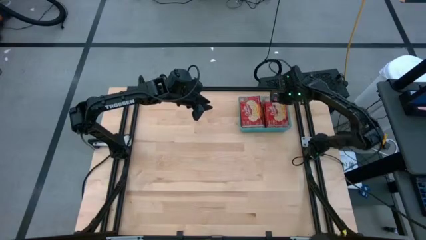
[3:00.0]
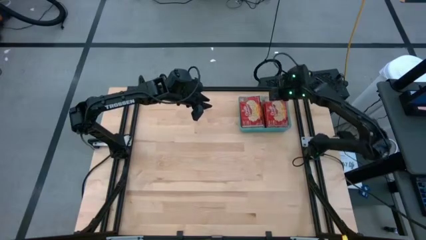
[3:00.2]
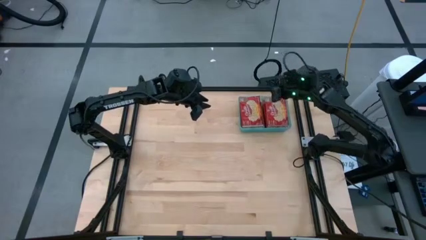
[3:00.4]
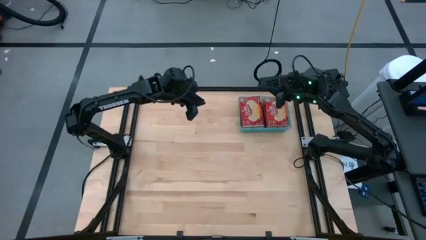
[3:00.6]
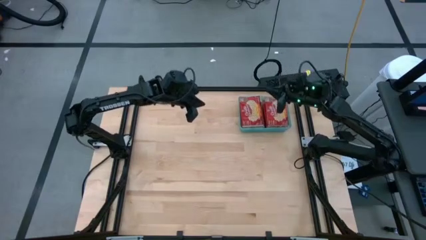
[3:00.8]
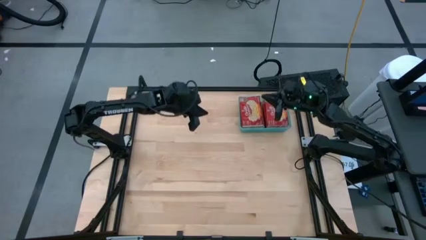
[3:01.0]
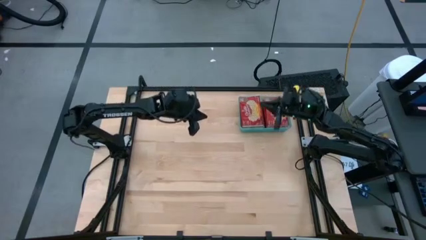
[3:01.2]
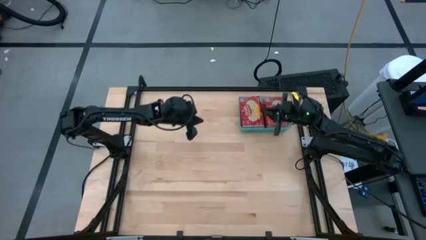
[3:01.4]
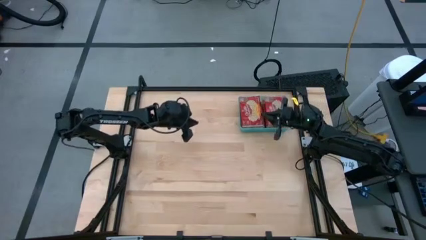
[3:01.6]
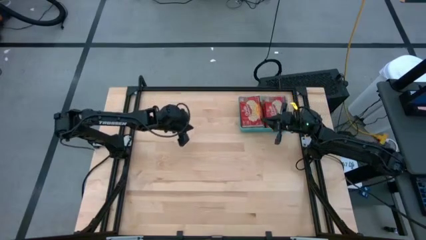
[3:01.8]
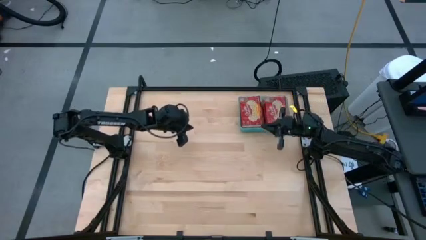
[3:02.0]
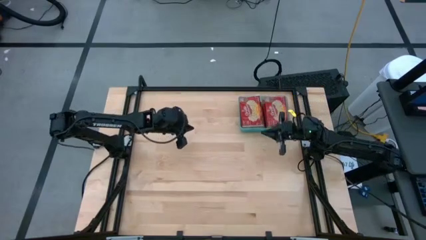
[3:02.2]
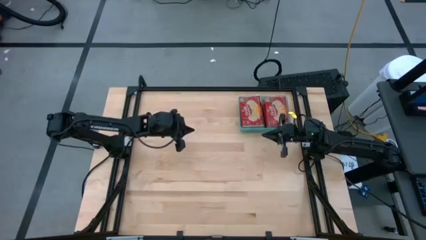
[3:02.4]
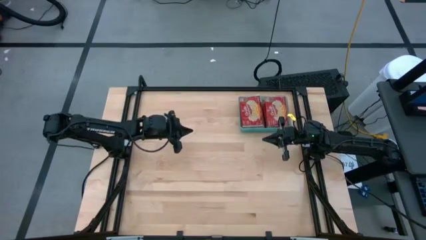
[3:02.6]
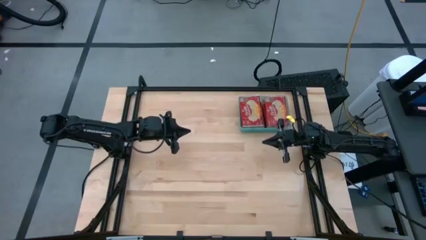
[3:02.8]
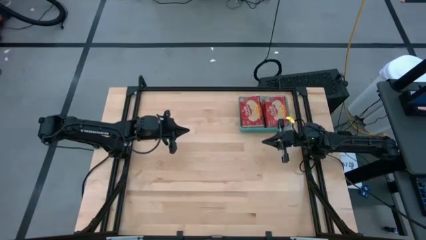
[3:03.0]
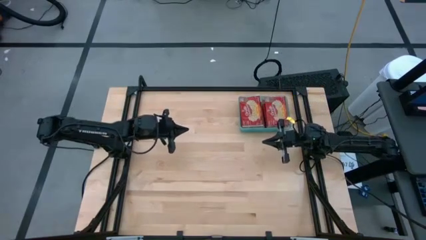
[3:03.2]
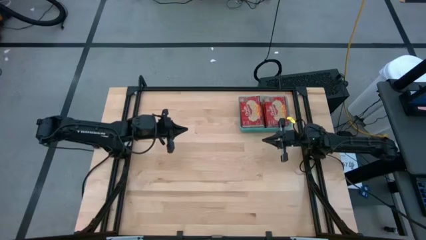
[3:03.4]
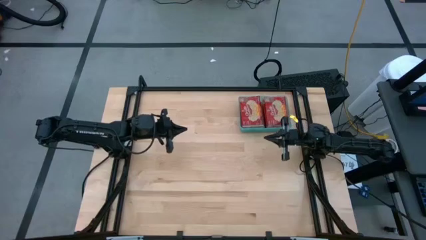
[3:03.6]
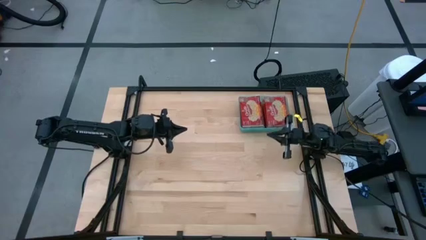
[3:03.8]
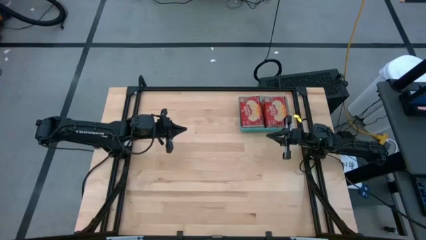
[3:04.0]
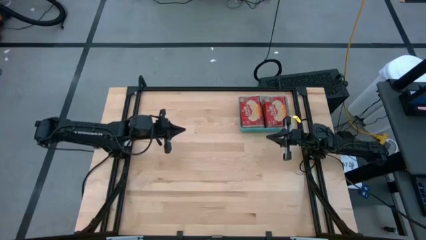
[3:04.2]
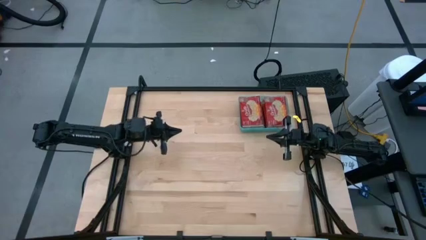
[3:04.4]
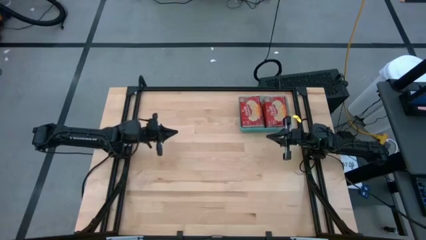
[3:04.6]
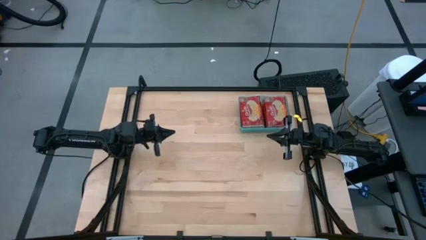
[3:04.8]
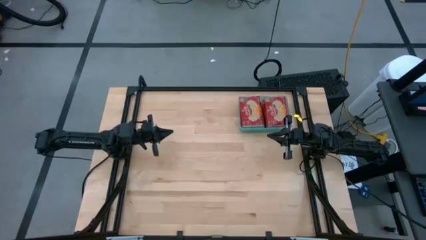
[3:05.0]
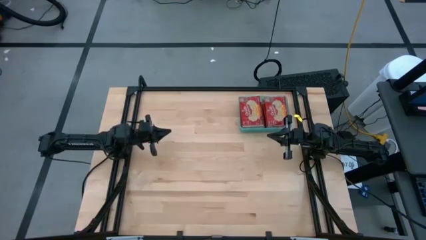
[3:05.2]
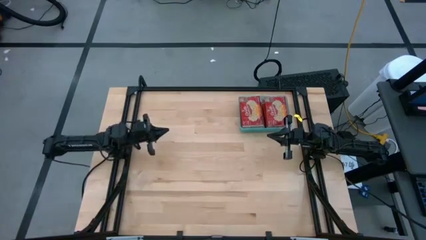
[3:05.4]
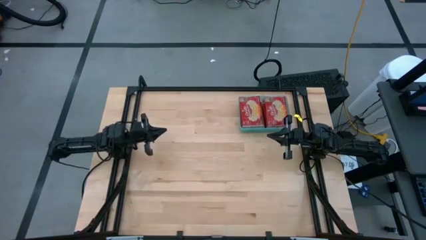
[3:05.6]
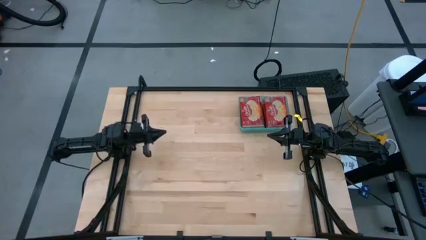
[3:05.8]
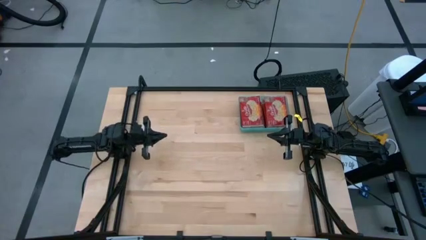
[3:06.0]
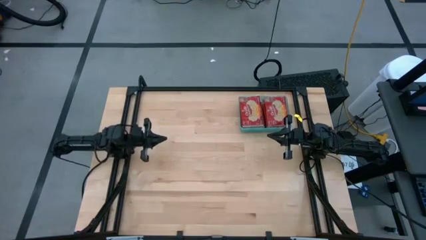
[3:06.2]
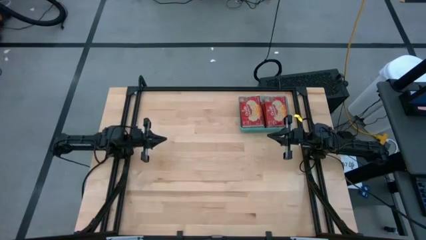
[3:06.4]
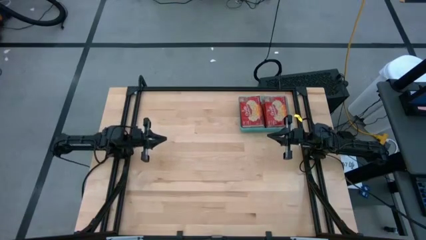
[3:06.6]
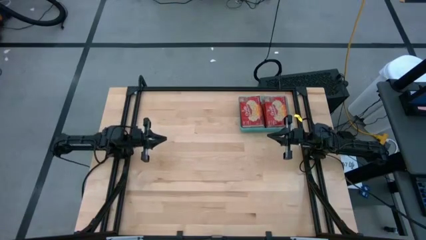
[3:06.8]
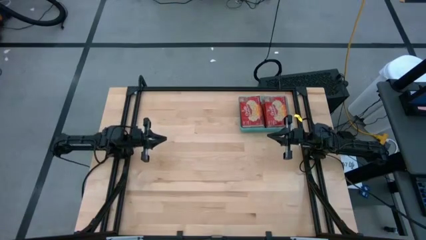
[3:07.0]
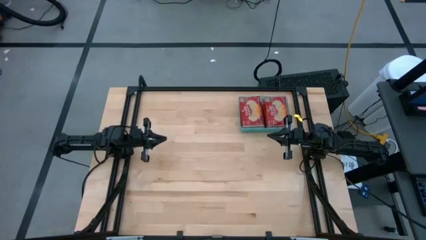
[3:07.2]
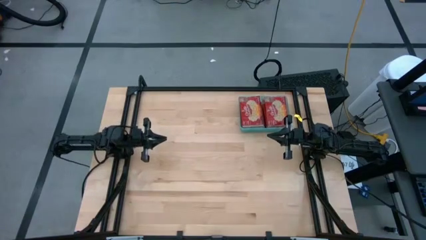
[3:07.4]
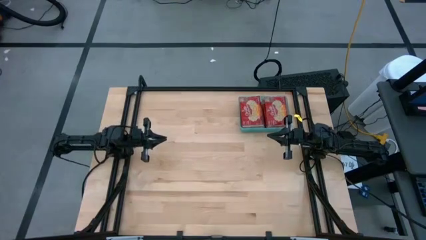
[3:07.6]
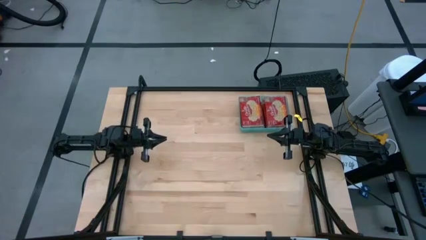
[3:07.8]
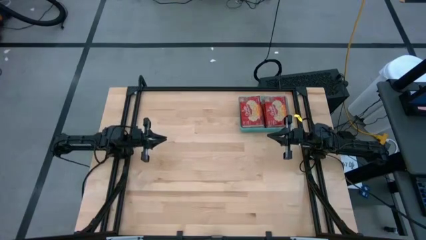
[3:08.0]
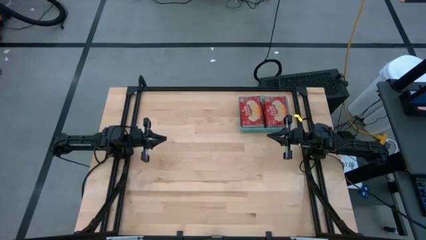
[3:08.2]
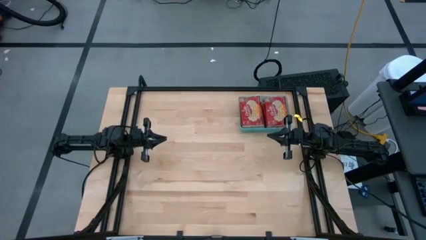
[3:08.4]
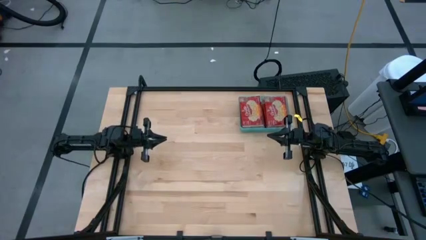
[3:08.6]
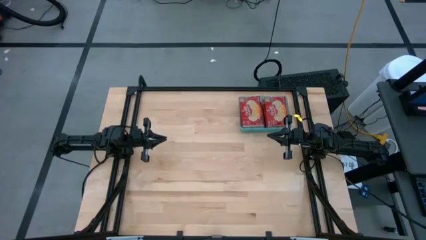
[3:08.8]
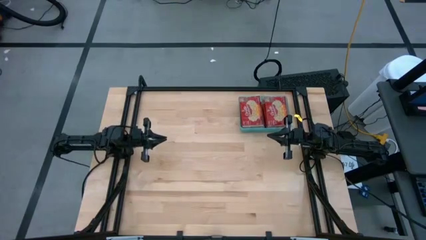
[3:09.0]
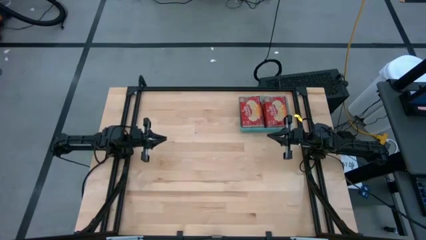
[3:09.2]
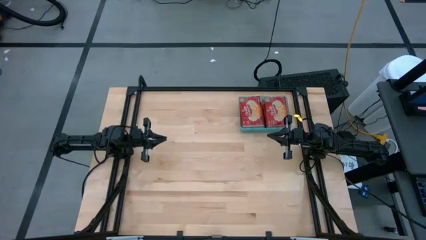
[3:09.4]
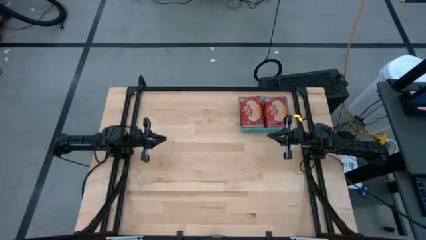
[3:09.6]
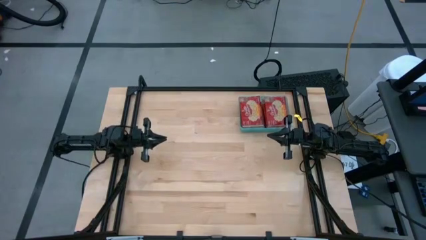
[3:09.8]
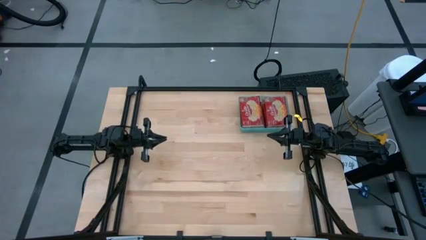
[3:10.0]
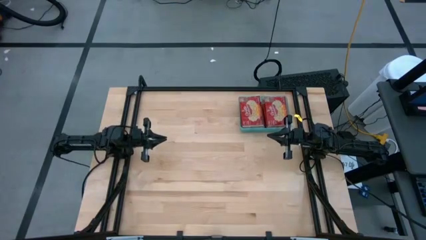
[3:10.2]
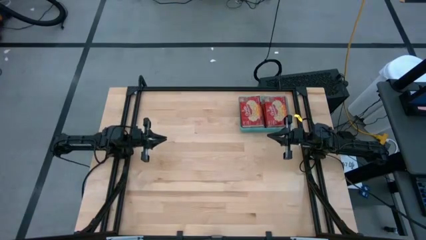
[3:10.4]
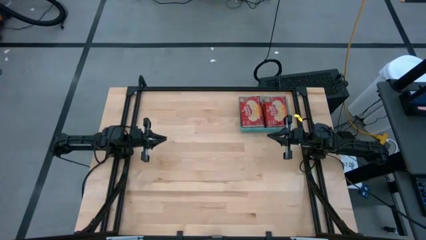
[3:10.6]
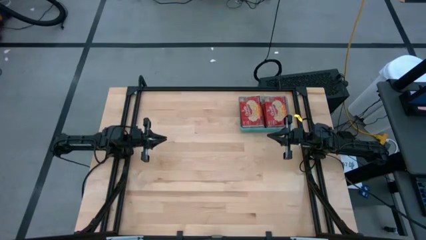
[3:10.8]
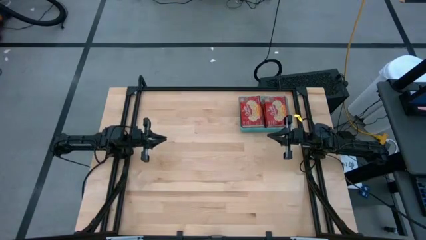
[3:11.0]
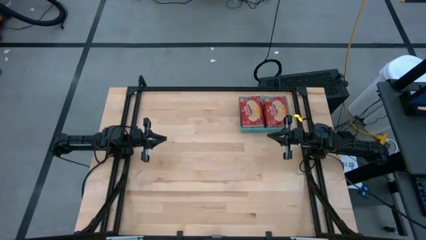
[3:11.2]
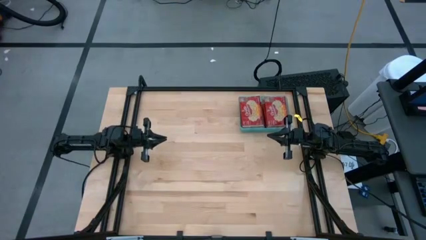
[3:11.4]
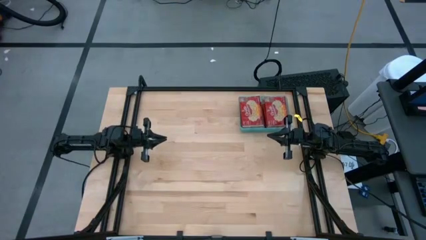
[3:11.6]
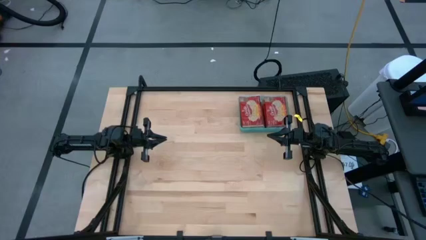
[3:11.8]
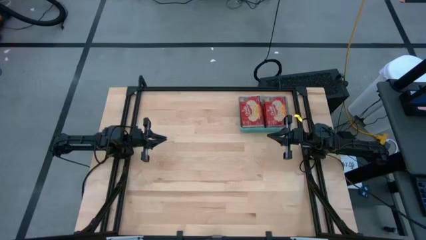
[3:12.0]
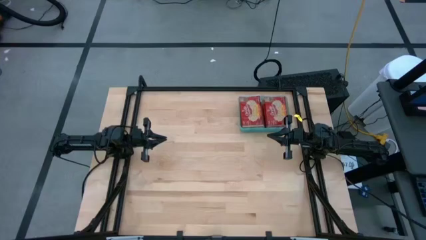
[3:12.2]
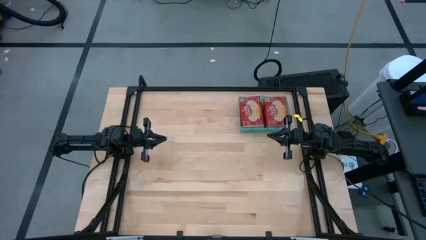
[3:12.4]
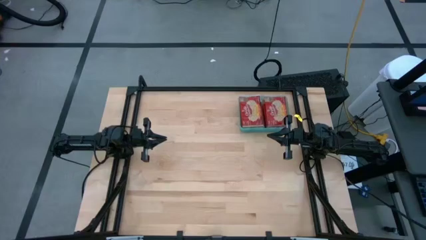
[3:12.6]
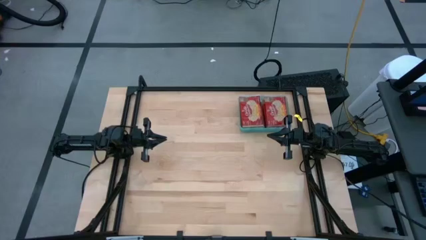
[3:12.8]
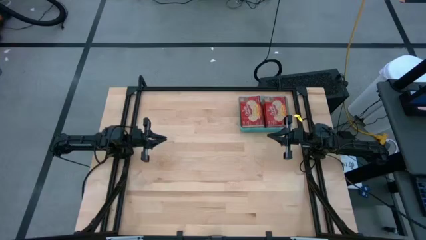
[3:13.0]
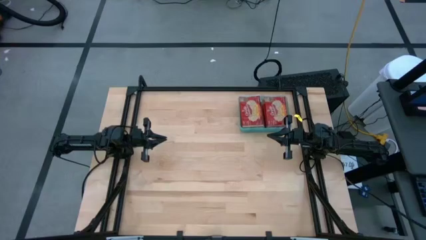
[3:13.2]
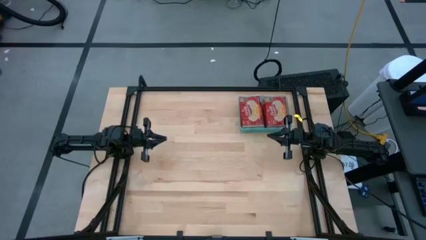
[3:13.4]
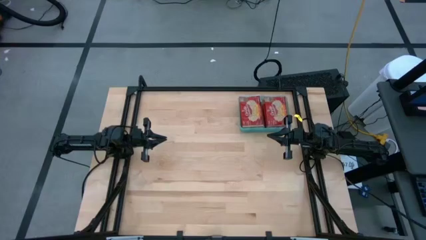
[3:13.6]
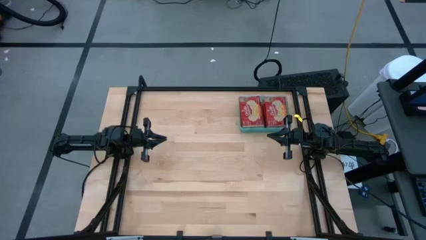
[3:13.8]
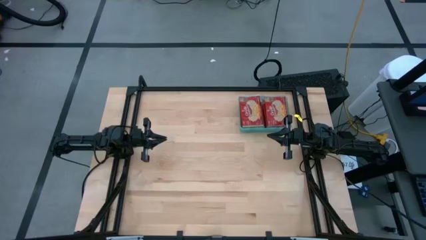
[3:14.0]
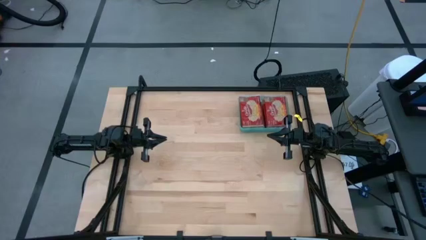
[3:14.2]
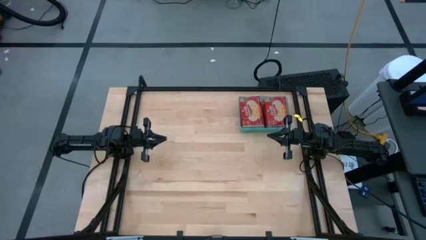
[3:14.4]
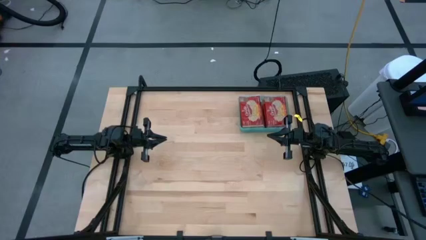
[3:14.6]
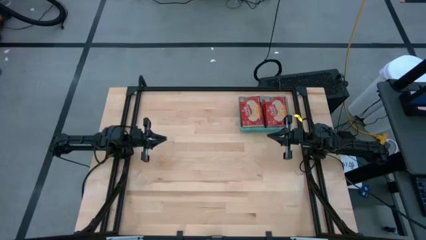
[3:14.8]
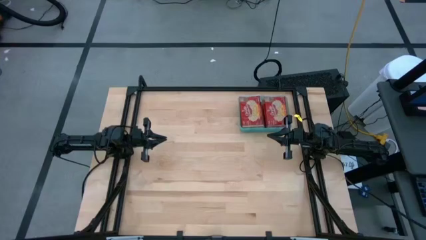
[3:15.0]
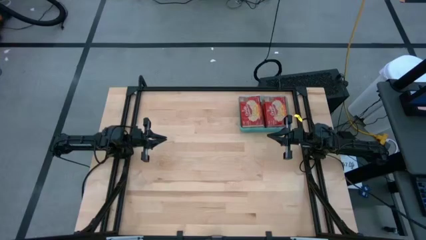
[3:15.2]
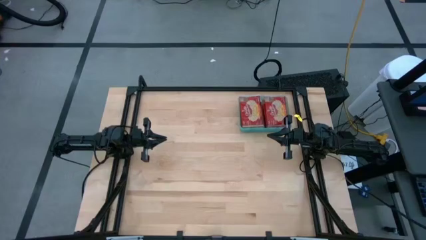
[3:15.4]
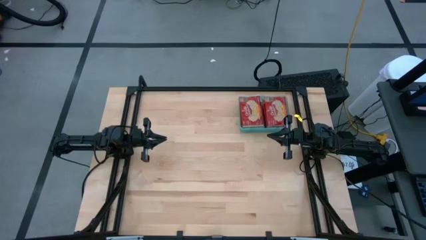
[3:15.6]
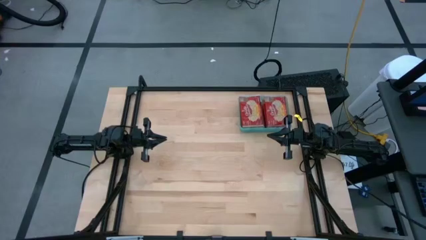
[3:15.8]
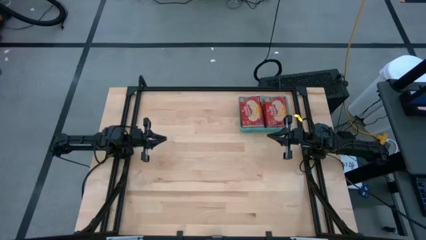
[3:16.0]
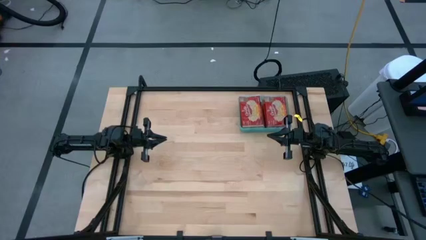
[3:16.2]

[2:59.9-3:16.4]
Task: Sort popcorn bags into baskets
Return to Home Position
